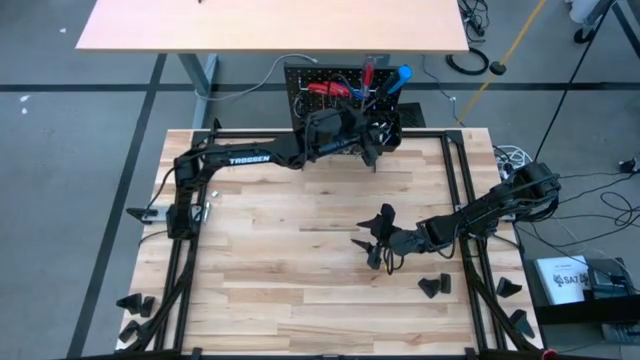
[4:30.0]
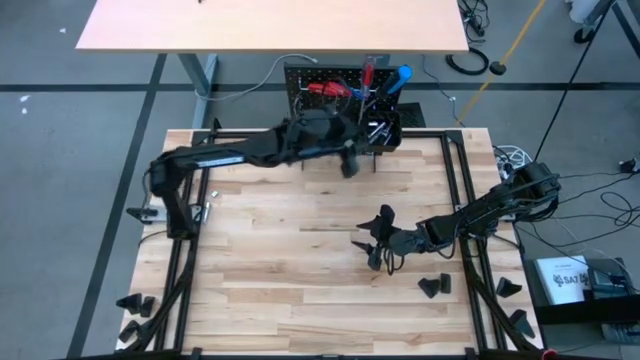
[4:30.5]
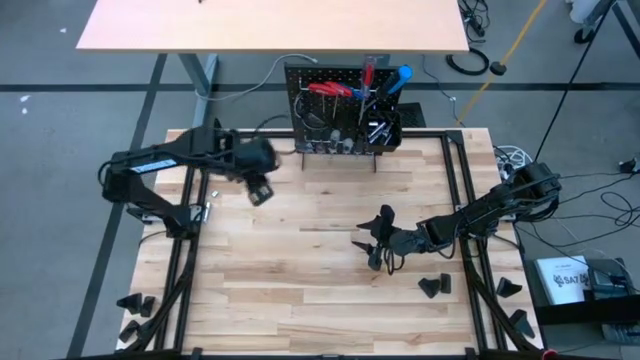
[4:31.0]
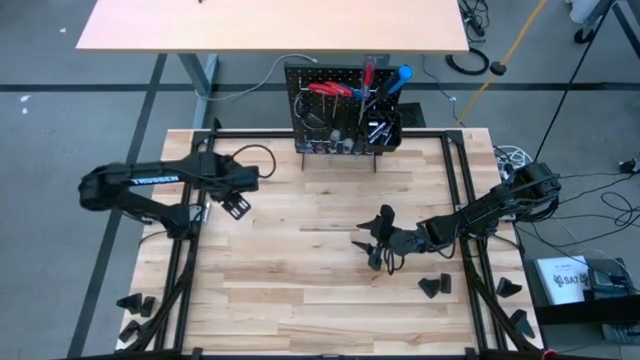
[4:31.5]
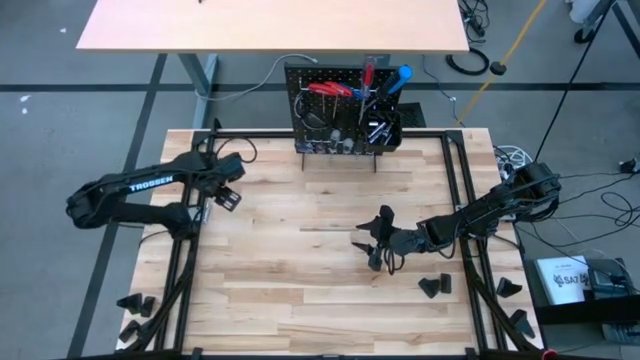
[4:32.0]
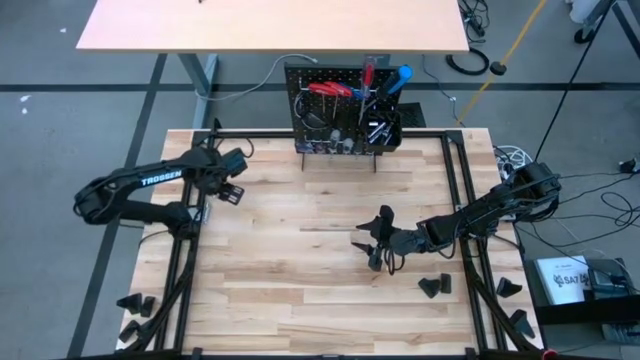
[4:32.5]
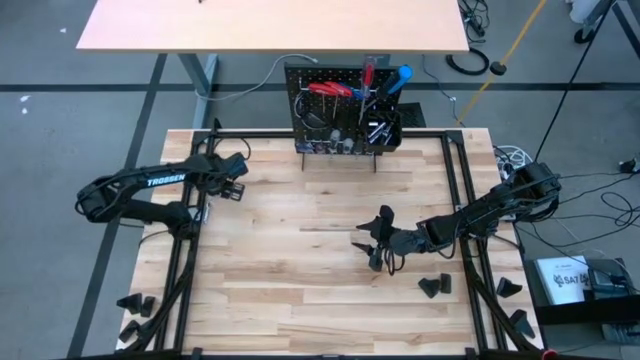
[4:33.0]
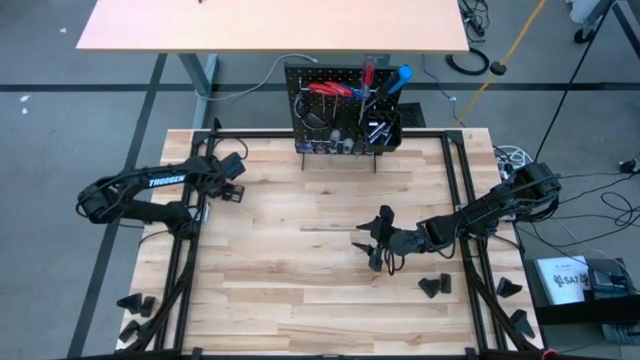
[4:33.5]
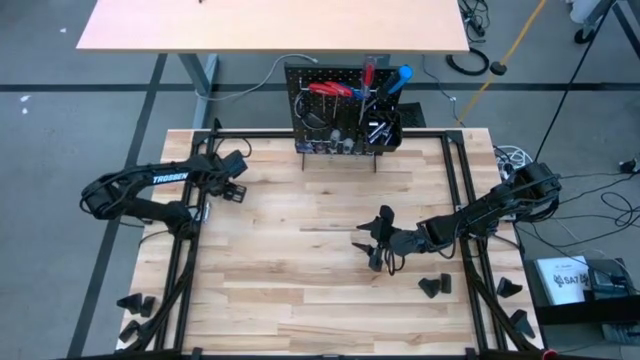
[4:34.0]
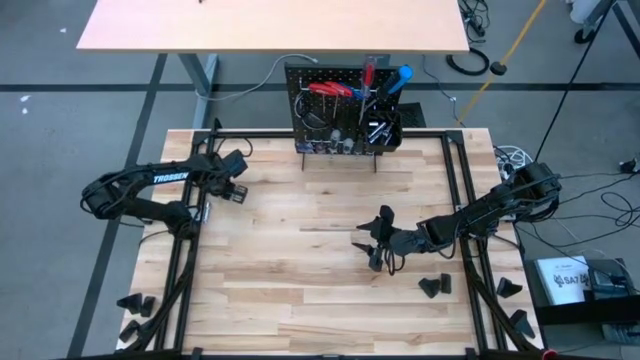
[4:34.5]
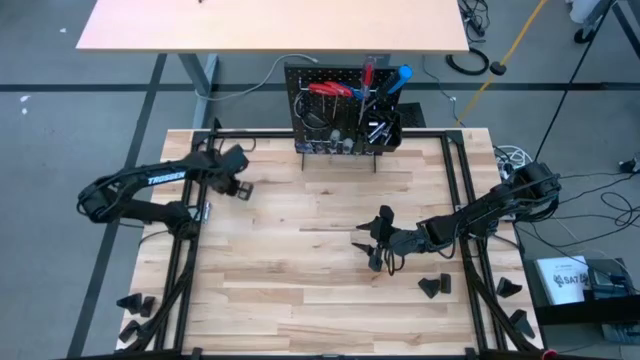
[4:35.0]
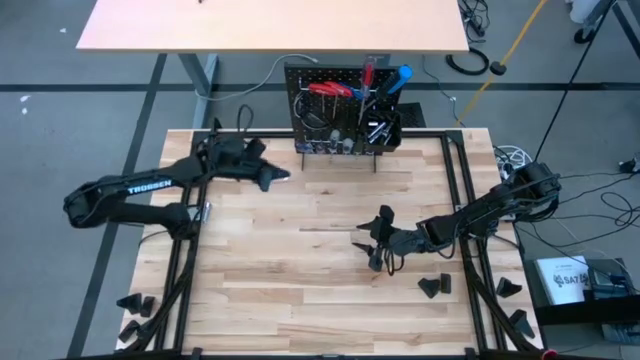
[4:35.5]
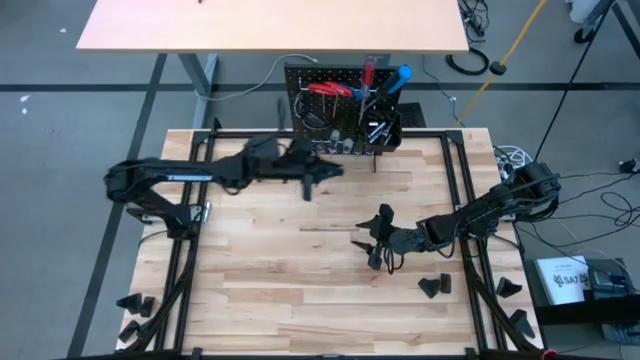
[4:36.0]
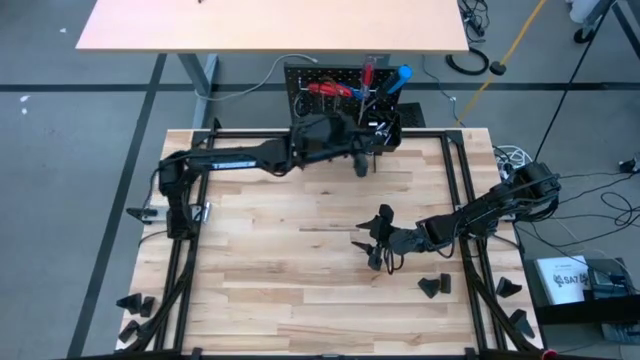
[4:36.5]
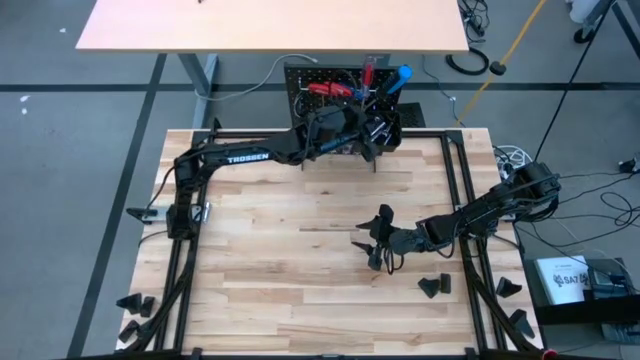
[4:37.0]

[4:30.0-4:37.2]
Task: Hang tools onto peg board
Put the silver socket into the black bin on the peg board

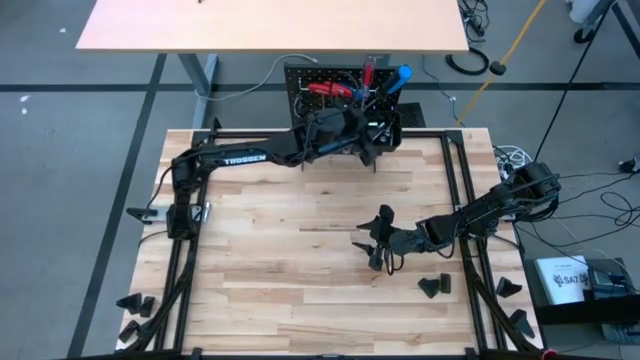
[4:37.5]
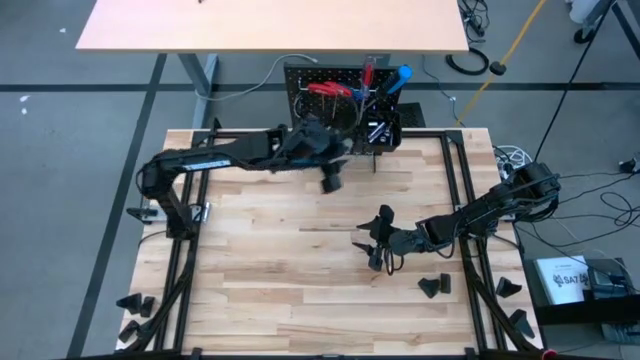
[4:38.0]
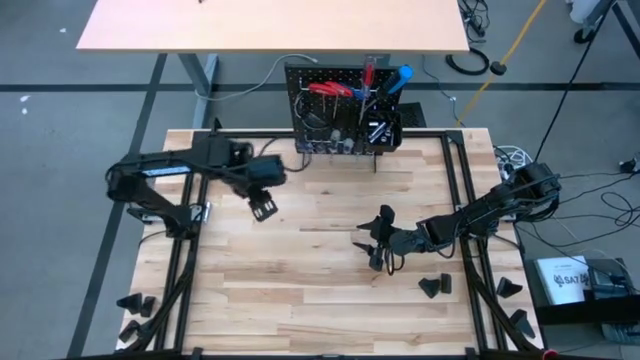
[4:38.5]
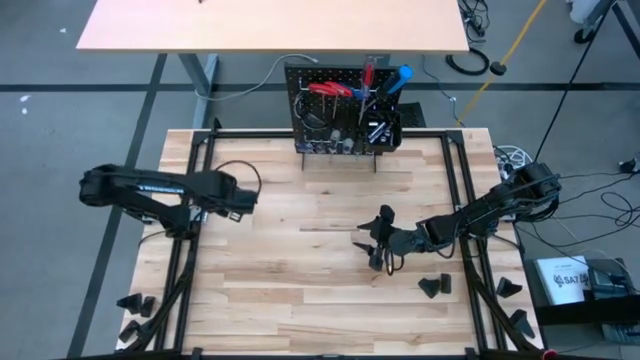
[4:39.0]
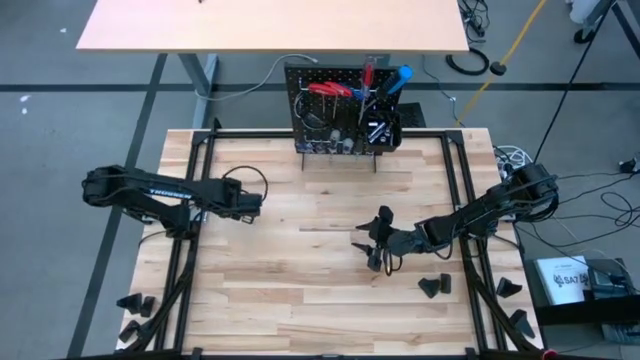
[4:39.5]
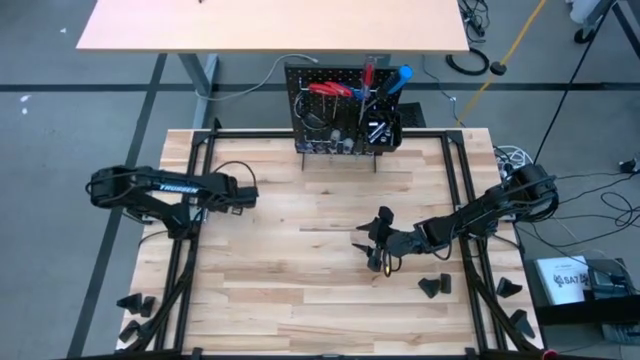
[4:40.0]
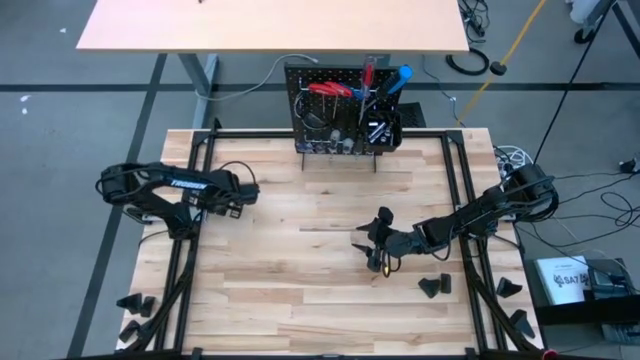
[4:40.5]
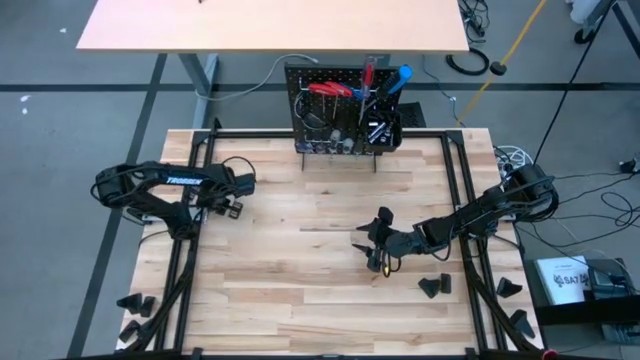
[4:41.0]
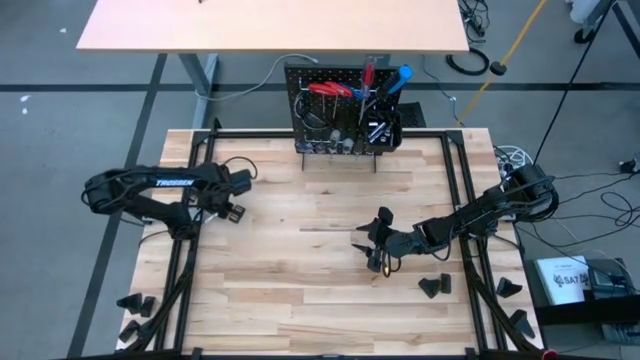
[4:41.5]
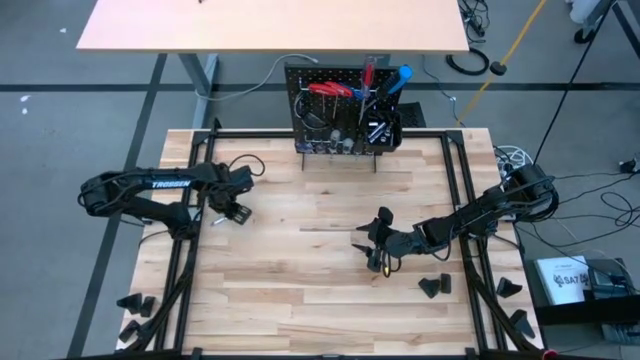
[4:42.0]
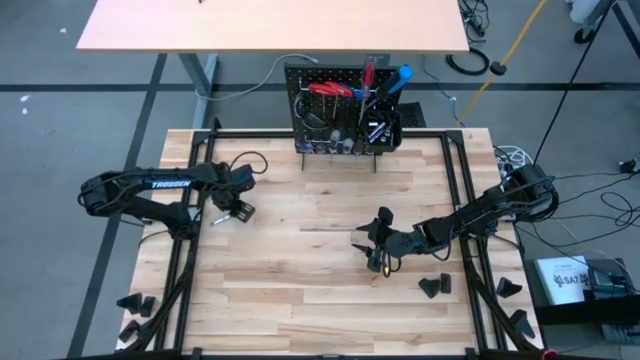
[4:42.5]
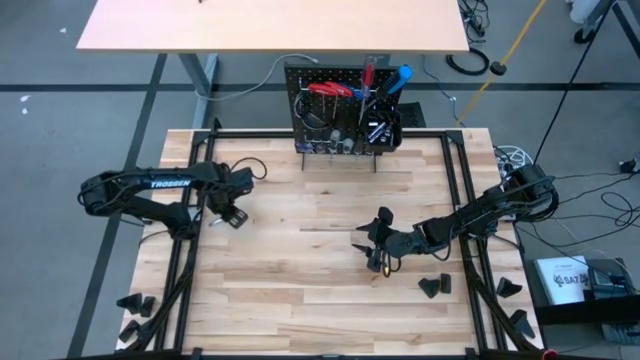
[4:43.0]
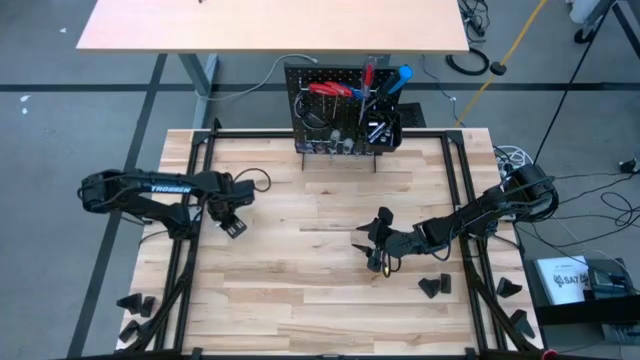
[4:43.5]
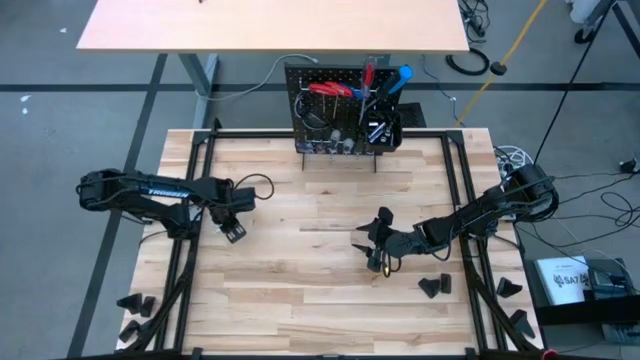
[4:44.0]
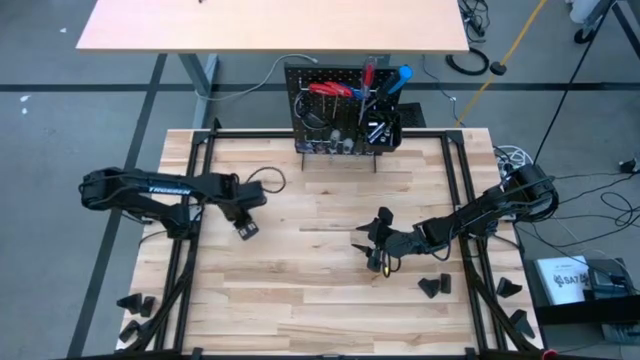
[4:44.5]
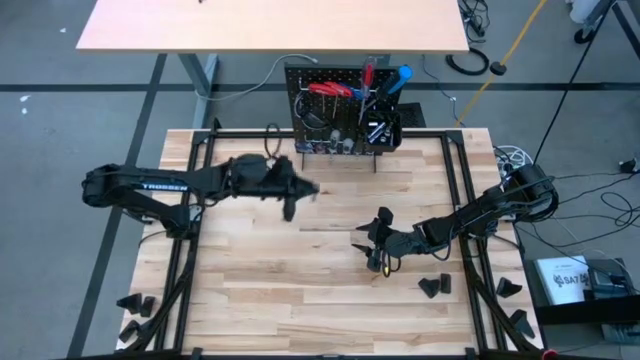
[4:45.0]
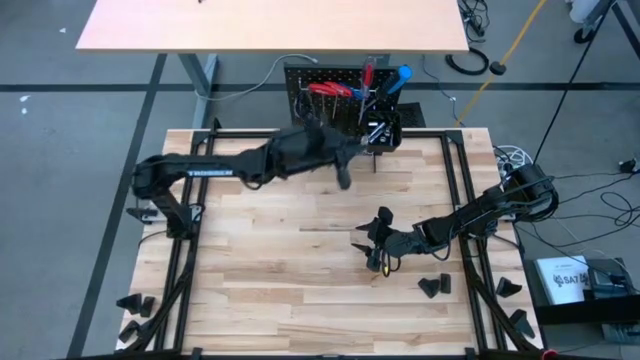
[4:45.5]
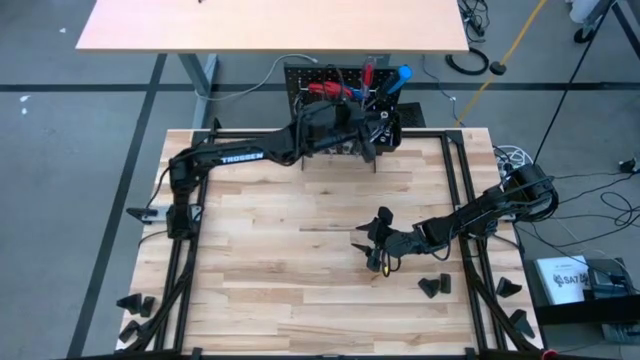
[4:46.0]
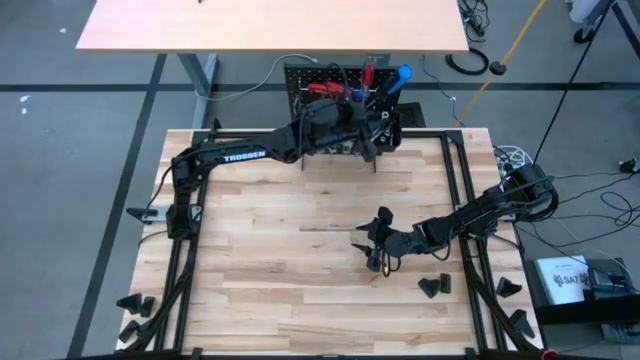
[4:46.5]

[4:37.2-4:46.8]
Put the silver extension bar into the black bin on the peg board

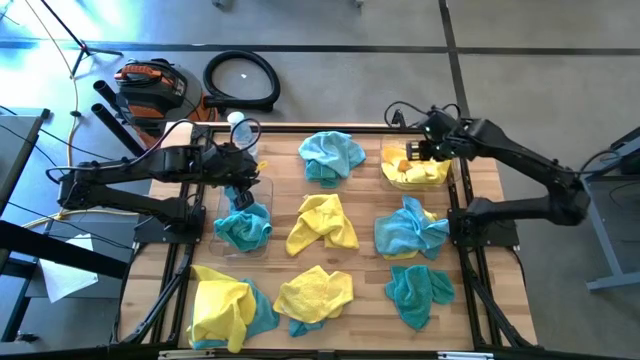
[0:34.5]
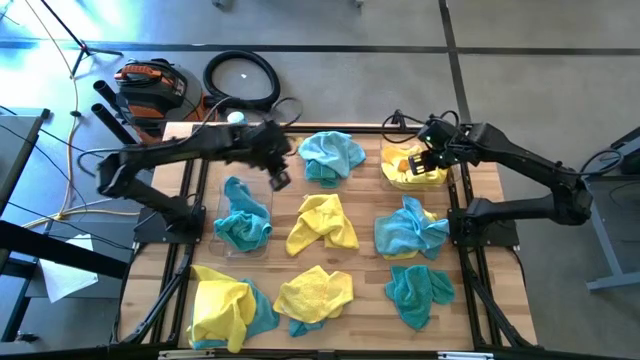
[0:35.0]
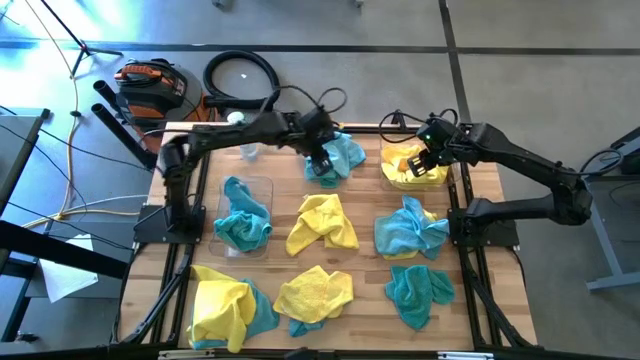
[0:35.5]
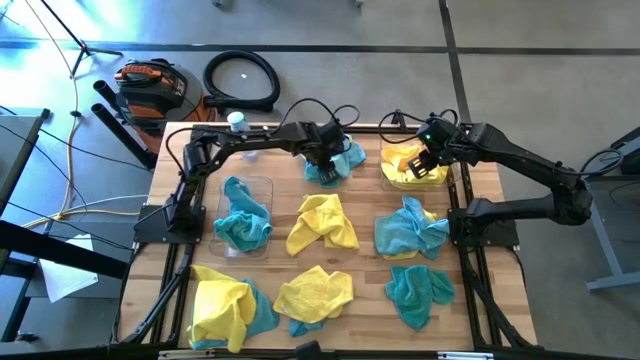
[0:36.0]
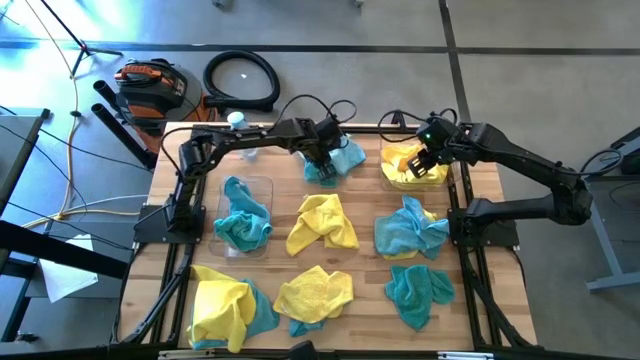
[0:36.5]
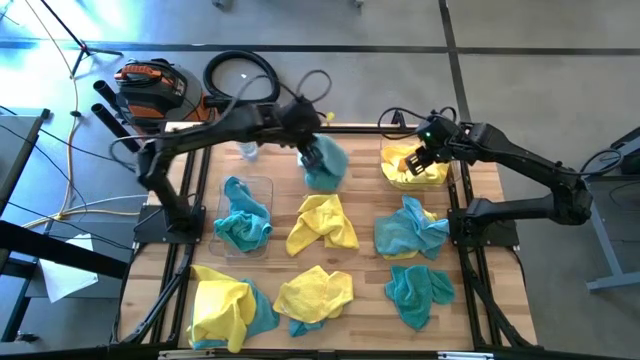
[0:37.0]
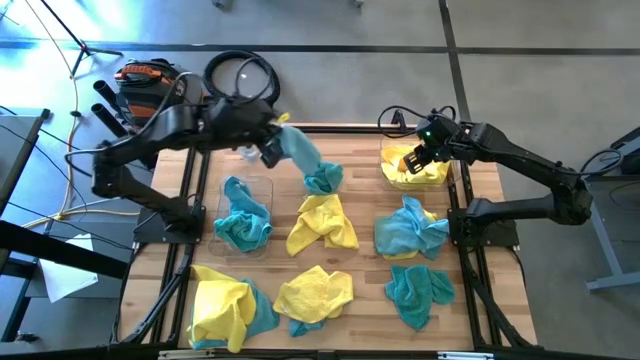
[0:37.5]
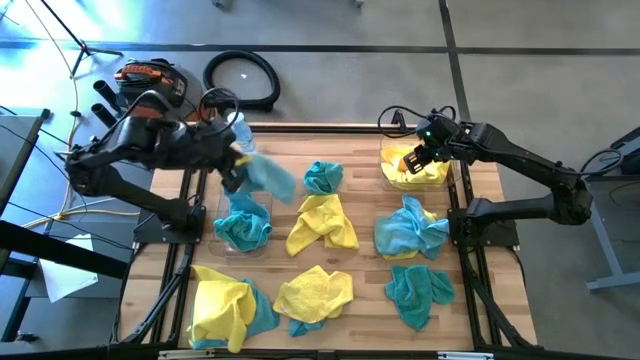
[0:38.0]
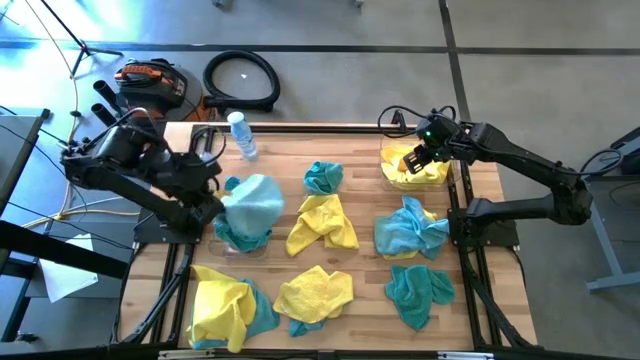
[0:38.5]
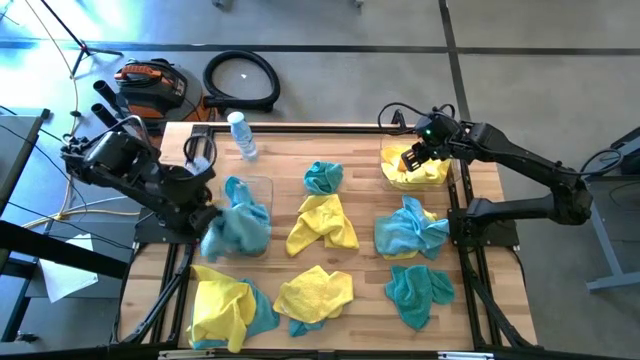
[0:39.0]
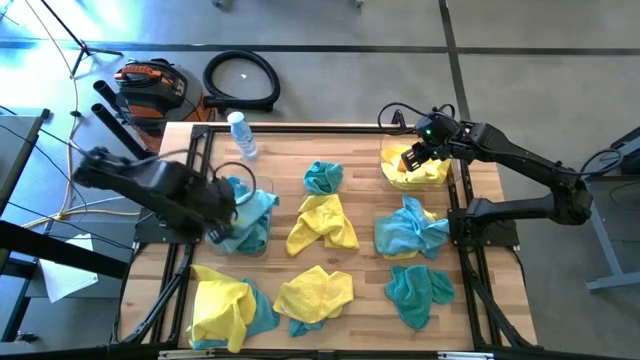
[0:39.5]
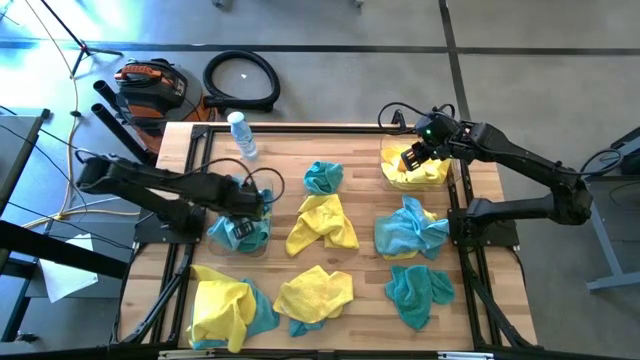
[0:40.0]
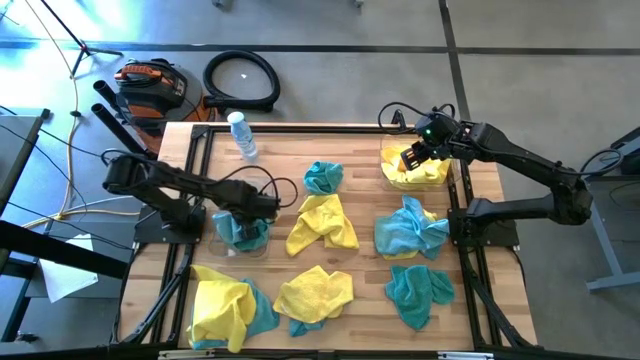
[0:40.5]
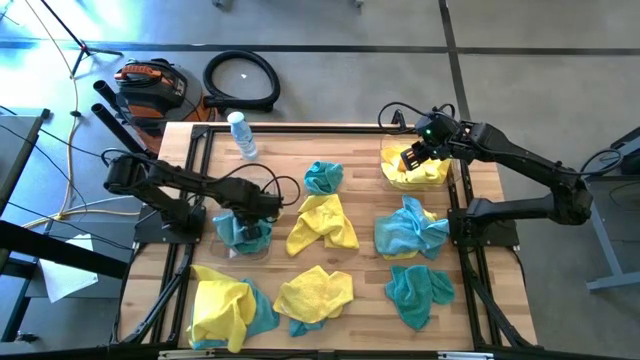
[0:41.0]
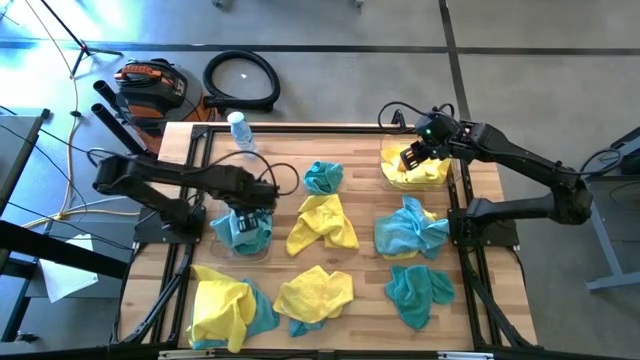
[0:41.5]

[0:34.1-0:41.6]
Task: Sort microfiber towel by color & place in baskets
Put the blue microfiber cloth into the left transparent bin
